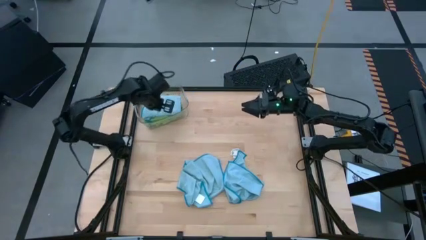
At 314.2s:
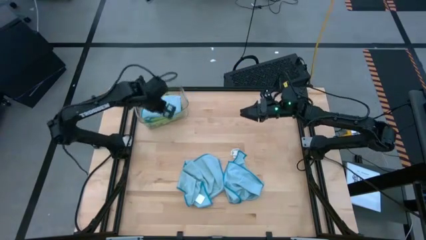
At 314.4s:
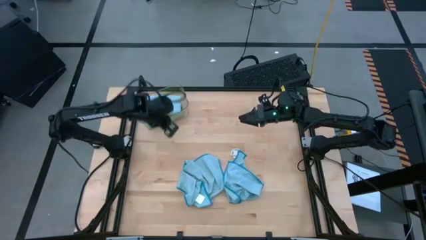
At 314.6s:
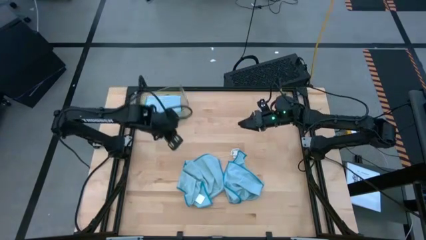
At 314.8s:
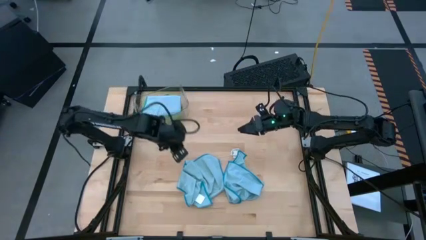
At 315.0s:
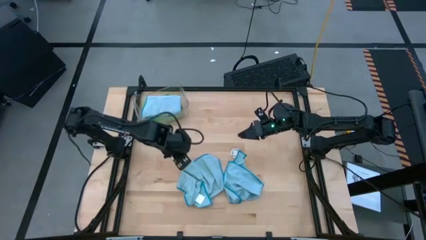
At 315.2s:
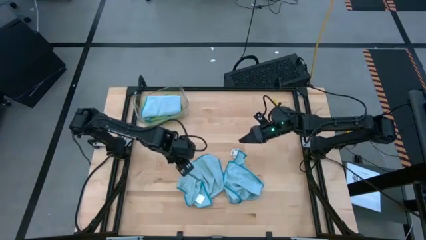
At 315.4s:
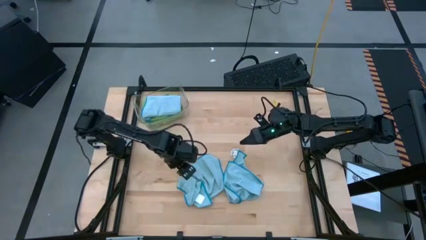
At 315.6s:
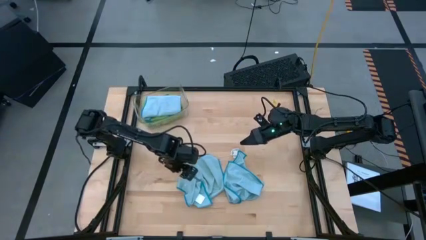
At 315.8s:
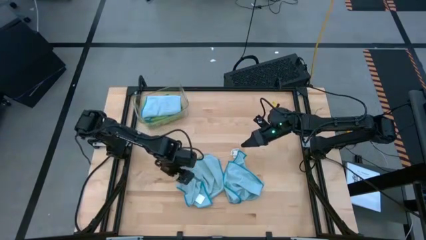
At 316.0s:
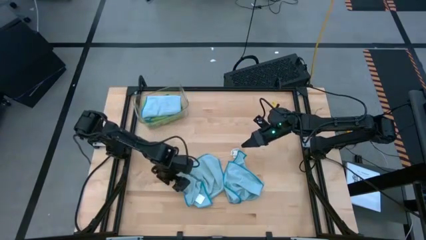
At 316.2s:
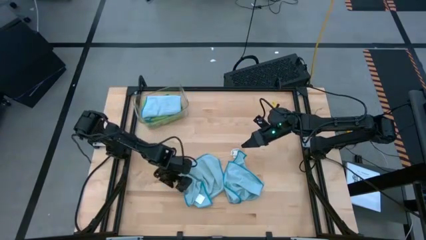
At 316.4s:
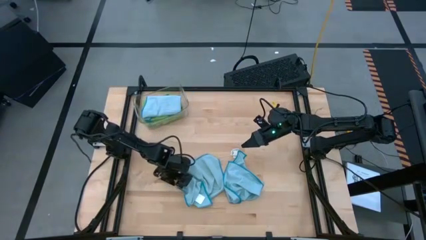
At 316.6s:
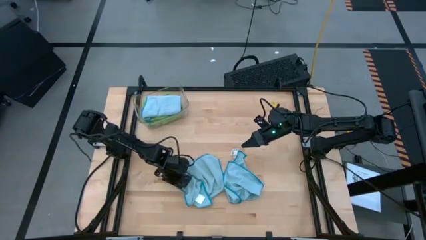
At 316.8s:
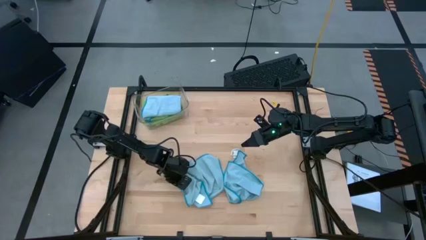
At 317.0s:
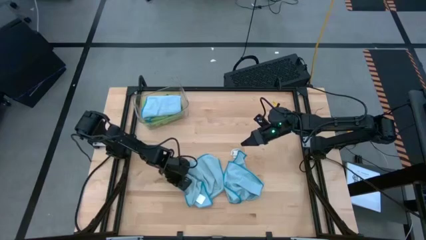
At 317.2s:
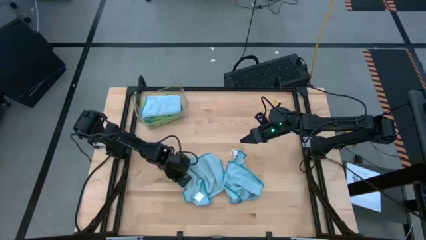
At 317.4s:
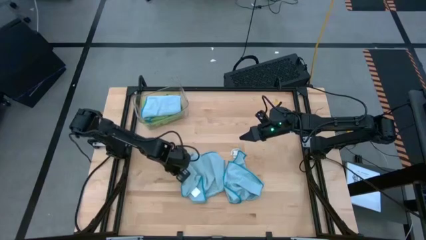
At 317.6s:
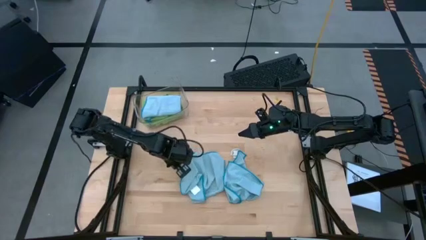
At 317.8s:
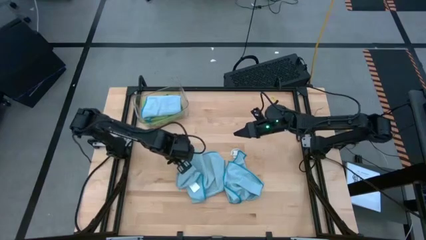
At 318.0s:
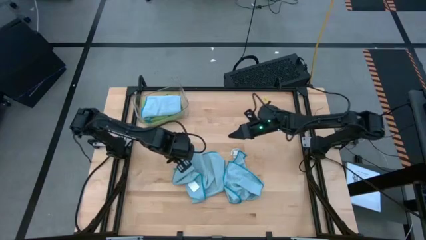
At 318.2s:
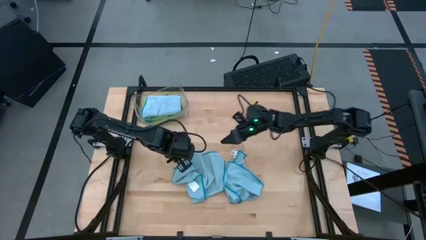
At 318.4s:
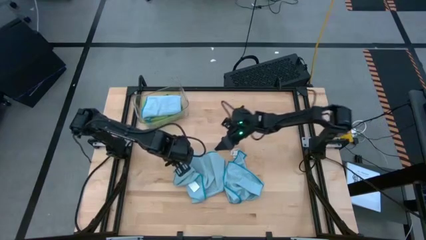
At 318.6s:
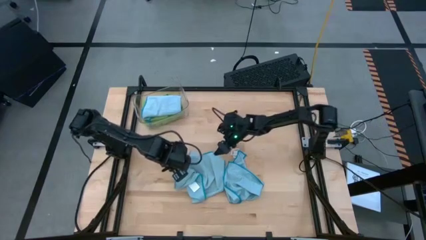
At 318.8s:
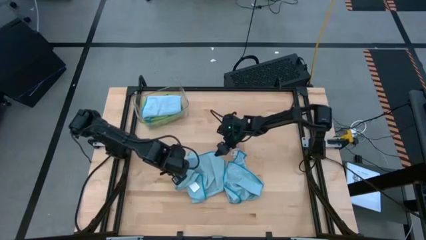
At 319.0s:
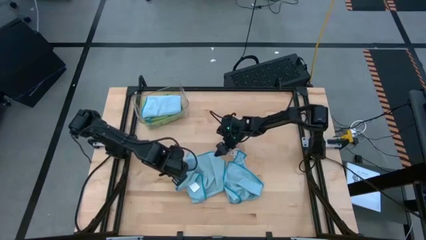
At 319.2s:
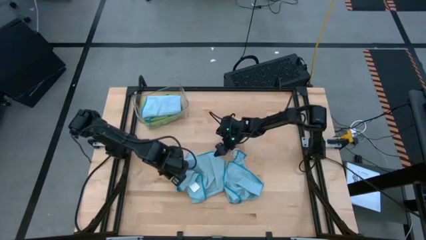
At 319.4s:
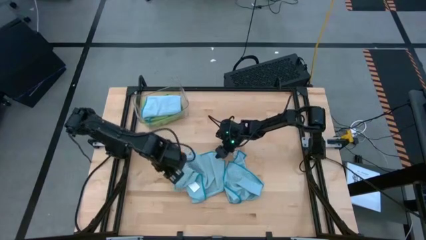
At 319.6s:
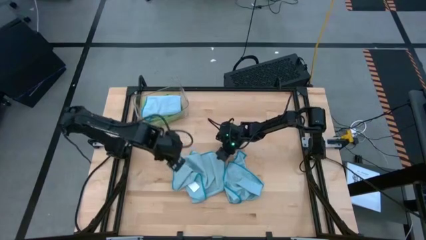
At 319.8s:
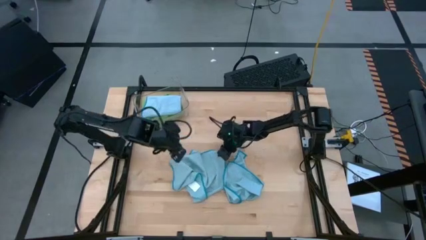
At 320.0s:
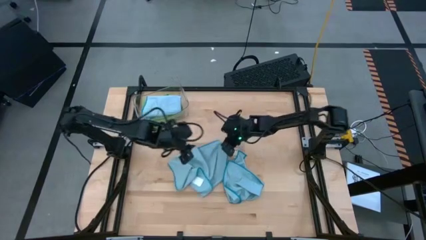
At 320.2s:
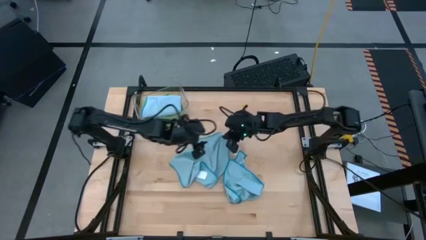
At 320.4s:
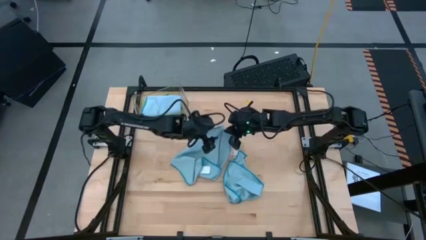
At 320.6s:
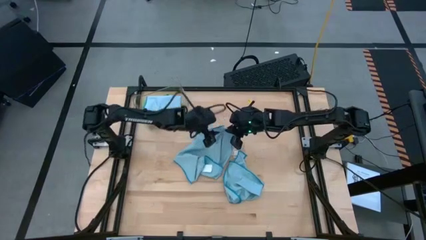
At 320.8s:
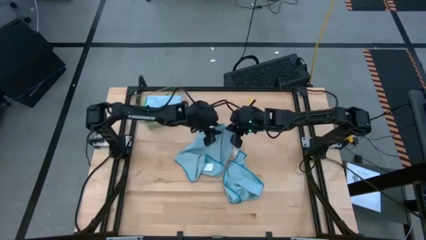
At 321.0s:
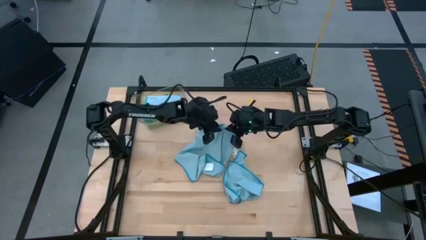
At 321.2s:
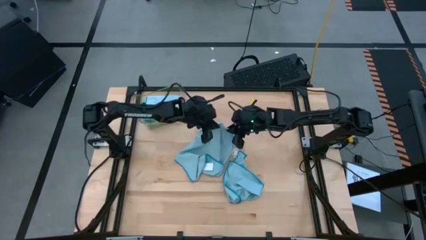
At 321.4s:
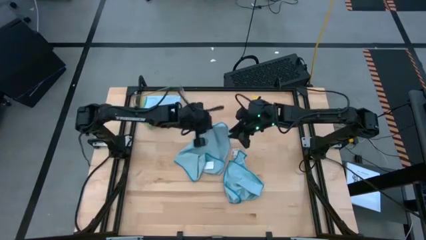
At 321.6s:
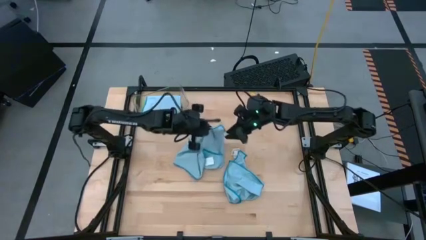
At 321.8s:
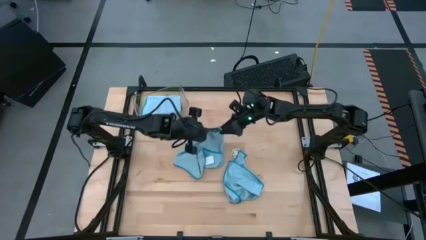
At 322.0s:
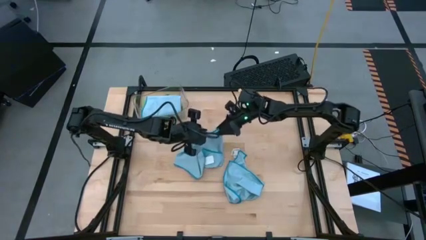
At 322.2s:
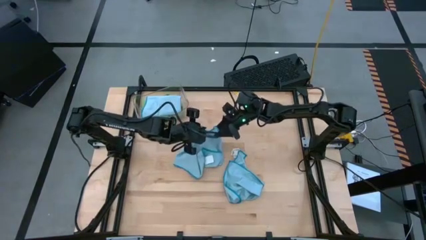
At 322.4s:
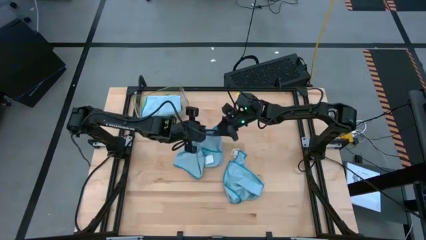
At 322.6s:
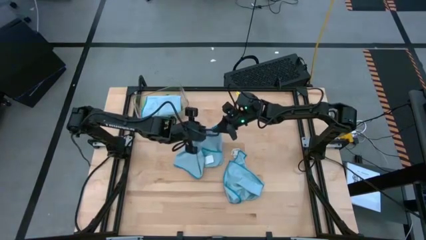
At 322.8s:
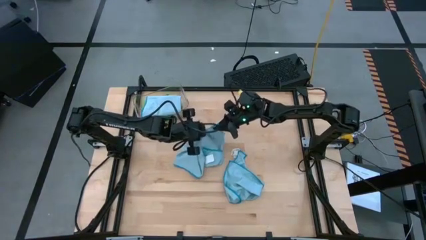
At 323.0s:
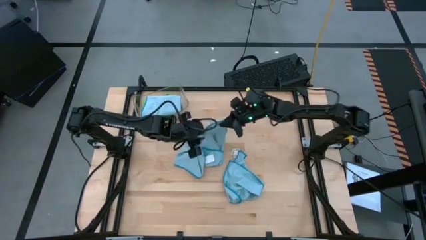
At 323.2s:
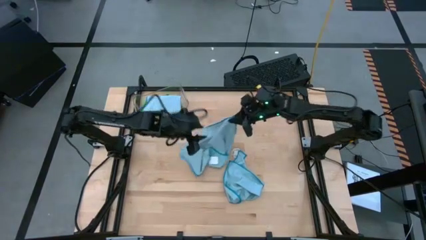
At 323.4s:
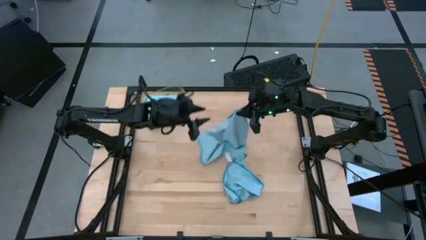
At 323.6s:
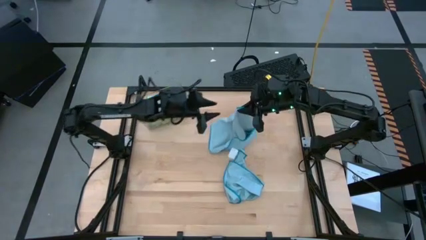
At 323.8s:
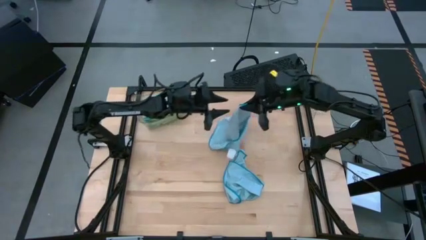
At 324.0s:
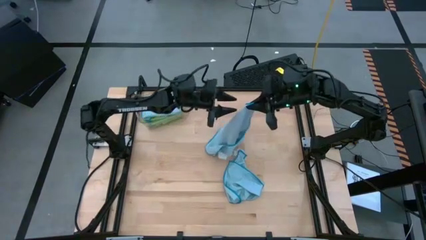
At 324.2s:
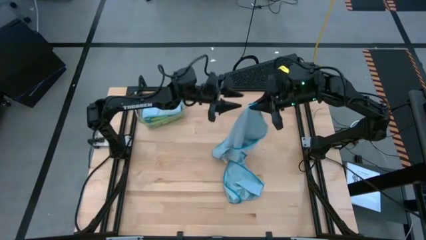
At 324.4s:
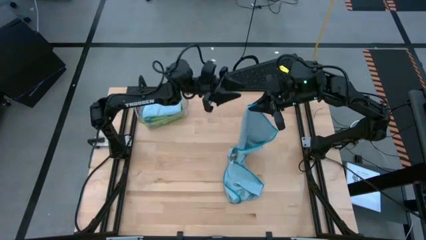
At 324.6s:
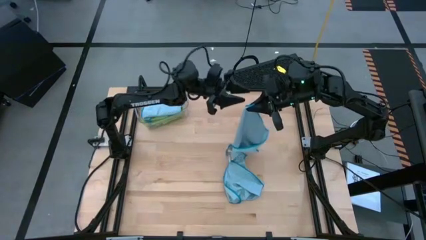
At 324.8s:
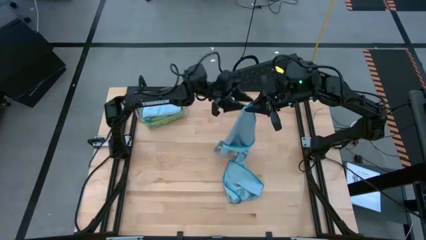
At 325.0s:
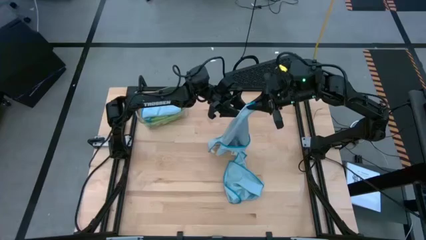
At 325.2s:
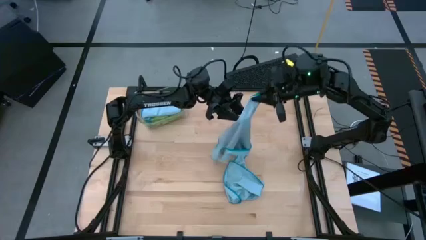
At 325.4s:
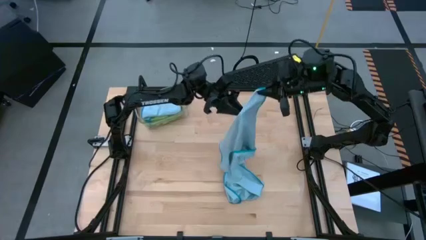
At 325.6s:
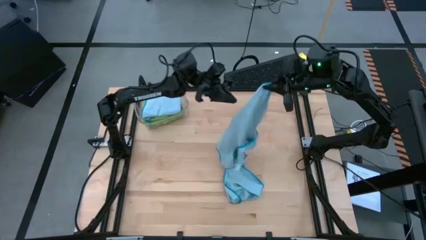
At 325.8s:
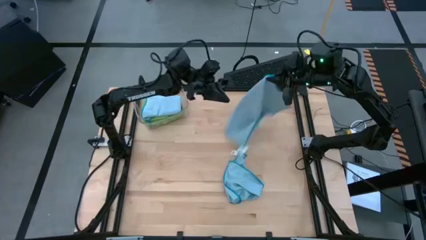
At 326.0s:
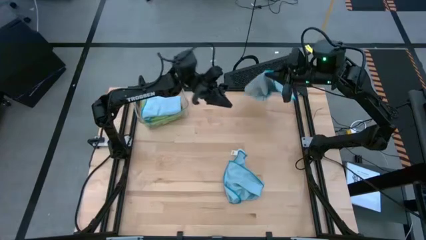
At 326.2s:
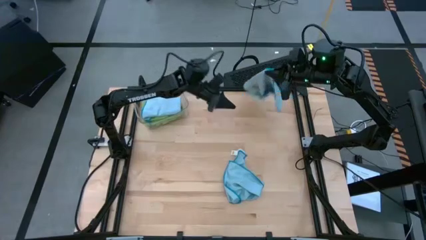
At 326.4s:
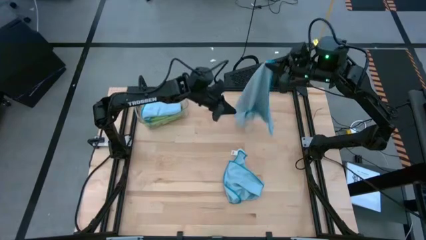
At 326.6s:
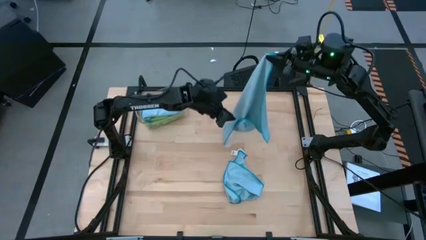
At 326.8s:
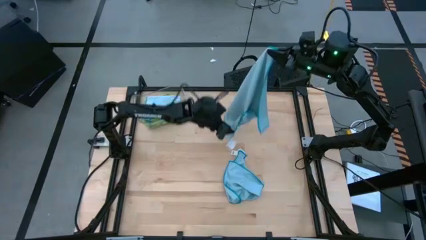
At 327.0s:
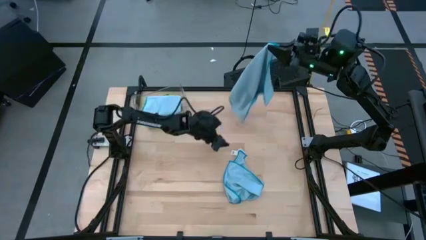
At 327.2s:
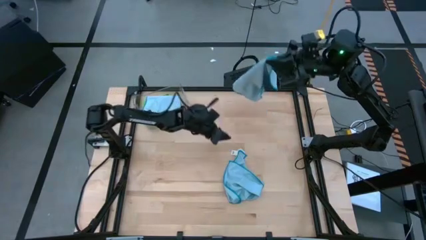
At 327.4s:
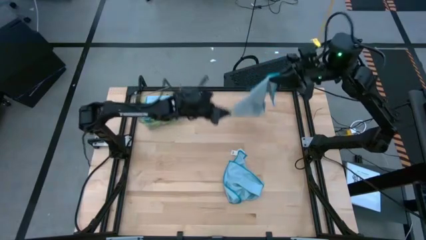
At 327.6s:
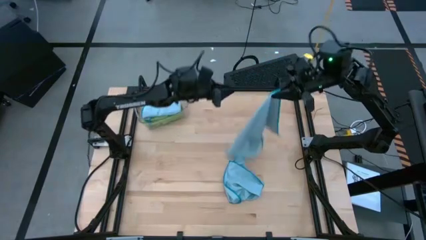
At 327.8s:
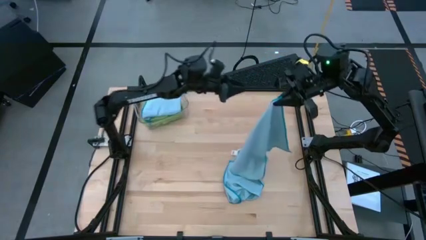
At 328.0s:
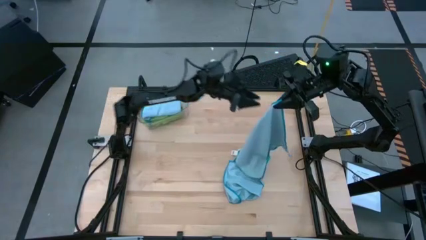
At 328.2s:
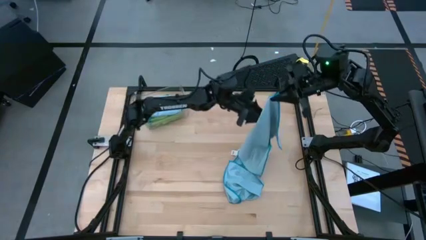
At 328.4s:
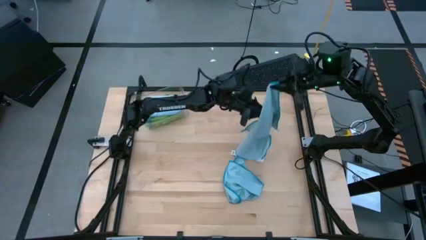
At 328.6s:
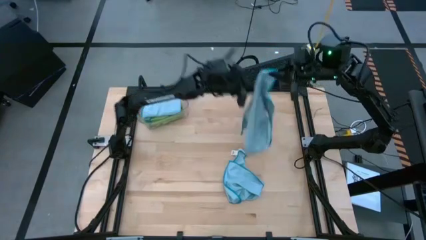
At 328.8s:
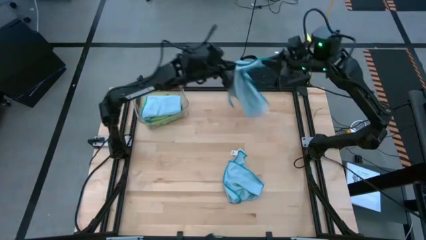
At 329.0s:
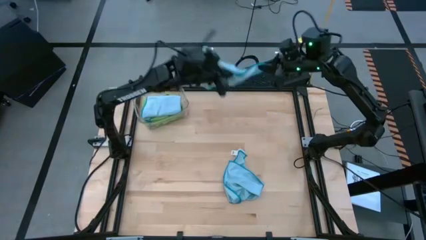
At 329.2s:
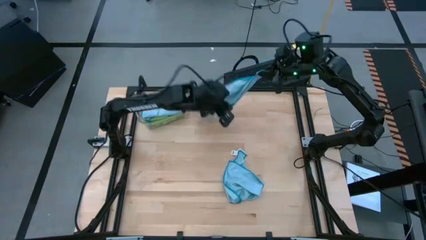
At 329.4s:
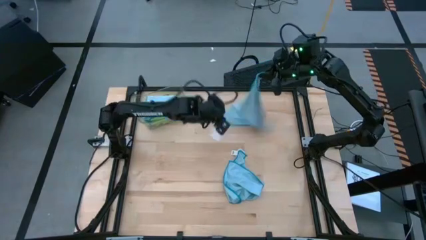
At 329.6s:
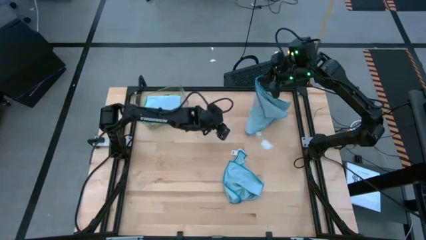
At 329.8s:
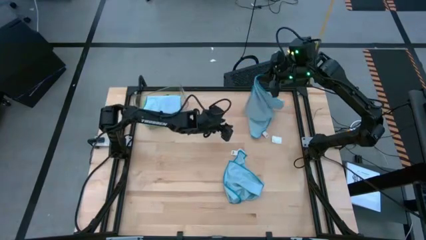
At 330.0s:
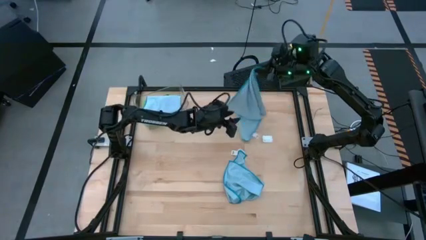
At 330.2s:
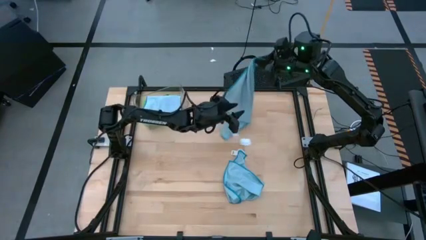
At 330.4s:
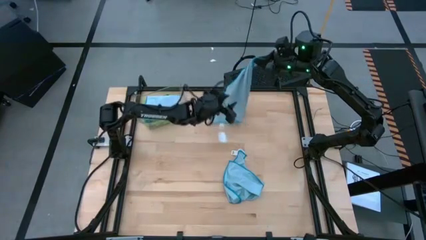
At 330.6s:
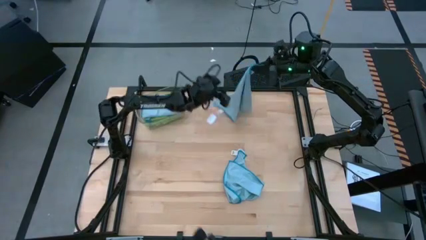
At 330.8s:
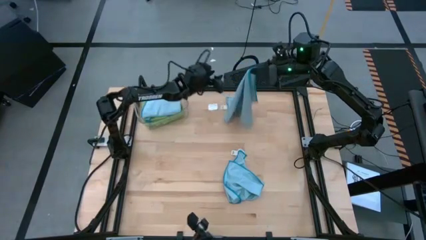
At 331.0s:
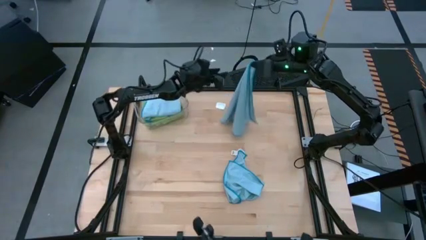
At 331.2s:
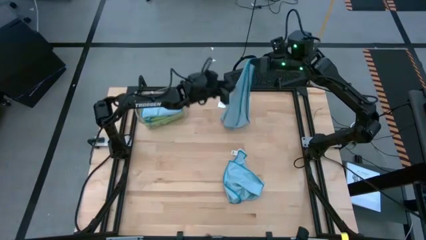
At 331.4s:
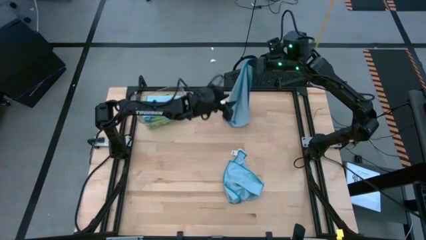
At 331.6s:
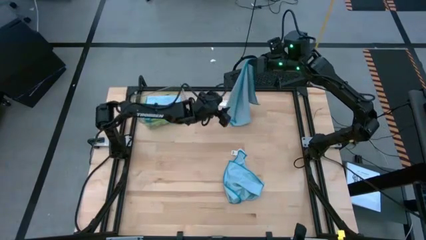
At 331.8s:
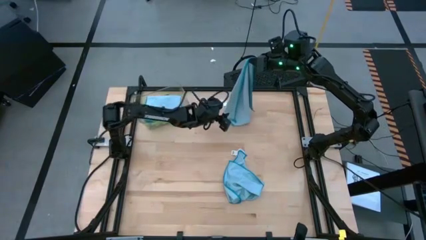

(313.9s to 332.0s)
Task: Fold microfiber towels
Fold the left blue microfiber cloth
